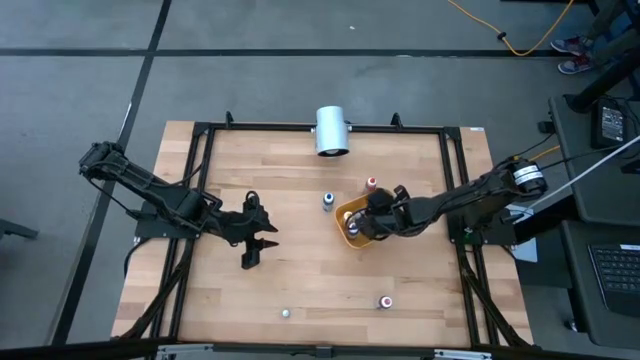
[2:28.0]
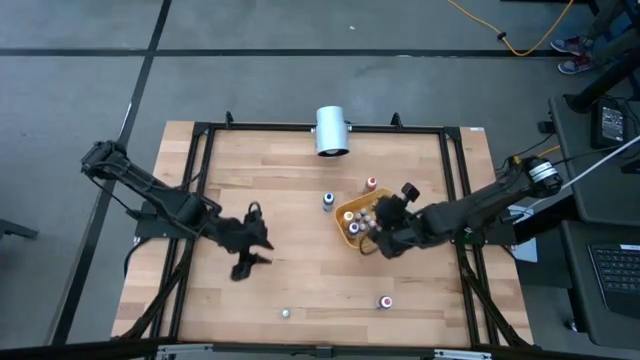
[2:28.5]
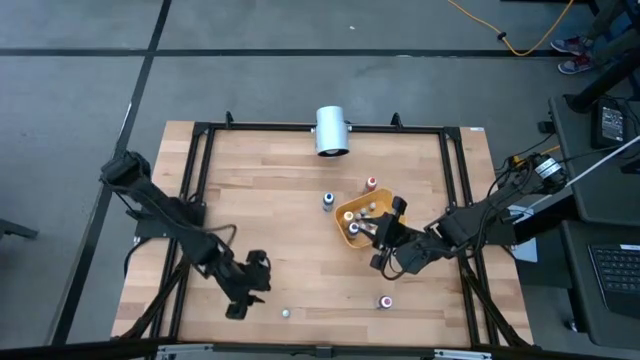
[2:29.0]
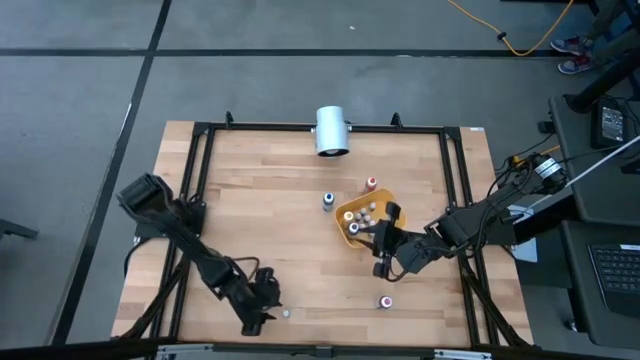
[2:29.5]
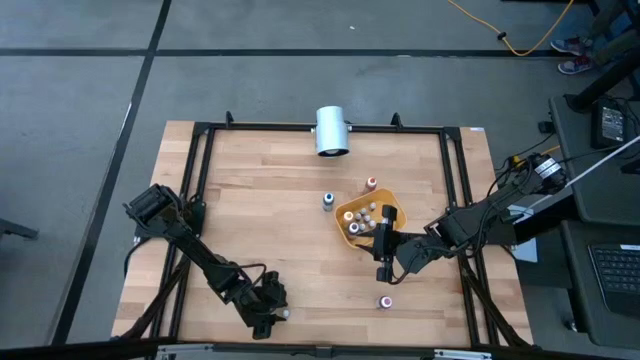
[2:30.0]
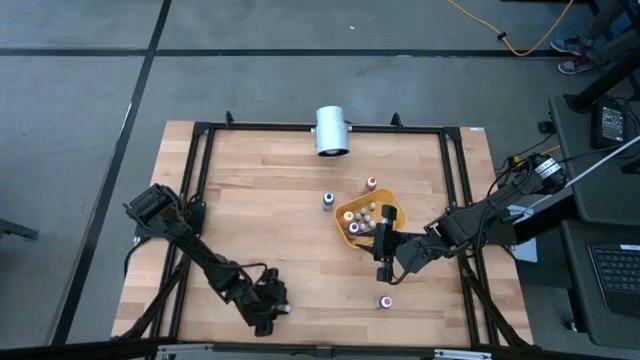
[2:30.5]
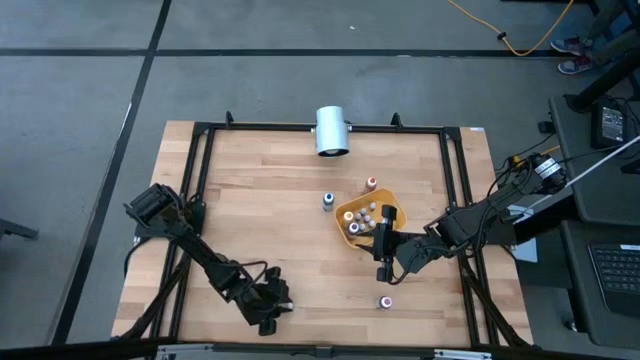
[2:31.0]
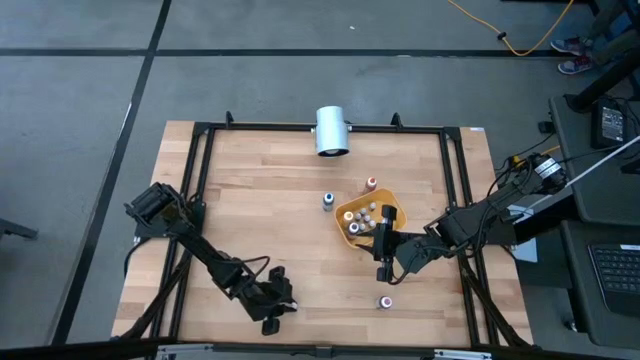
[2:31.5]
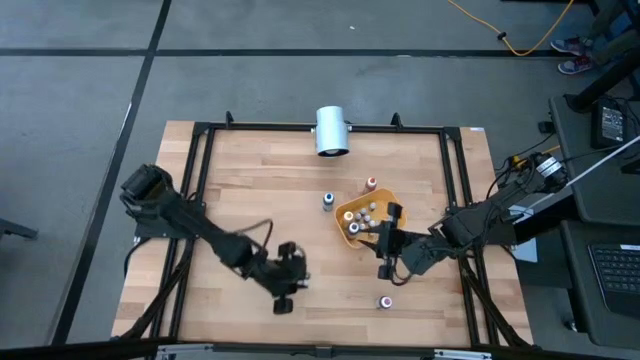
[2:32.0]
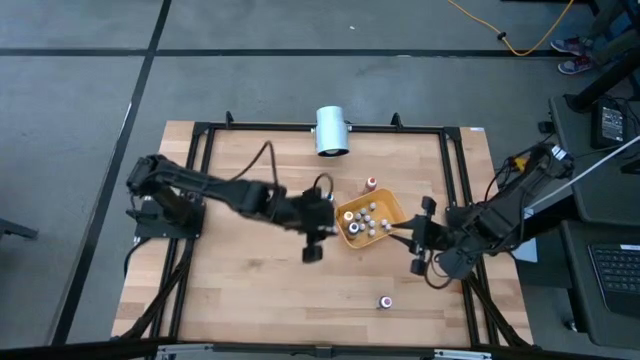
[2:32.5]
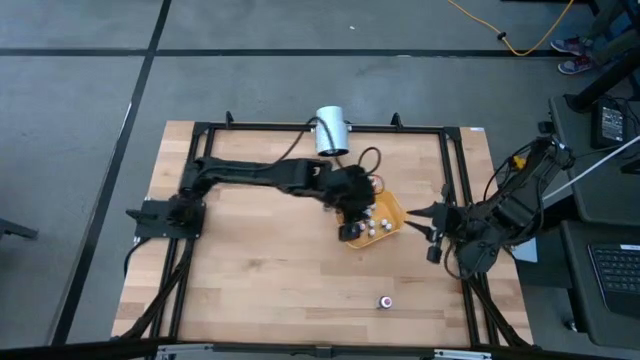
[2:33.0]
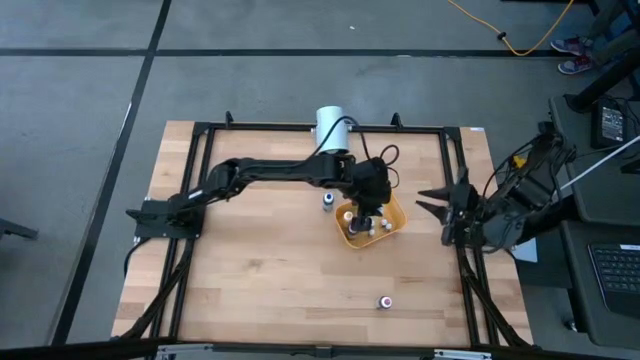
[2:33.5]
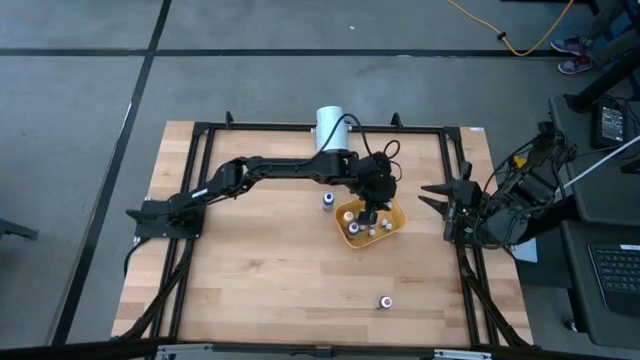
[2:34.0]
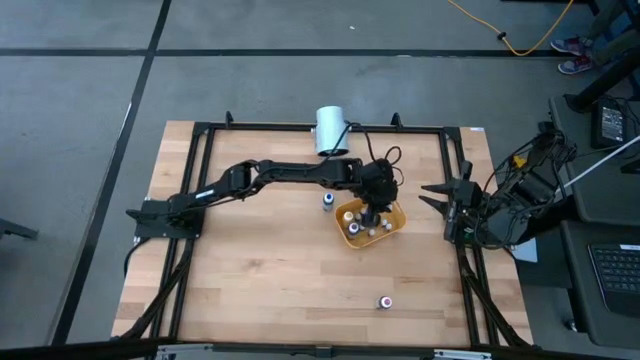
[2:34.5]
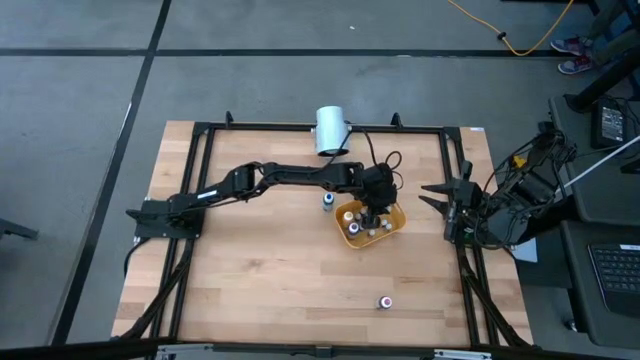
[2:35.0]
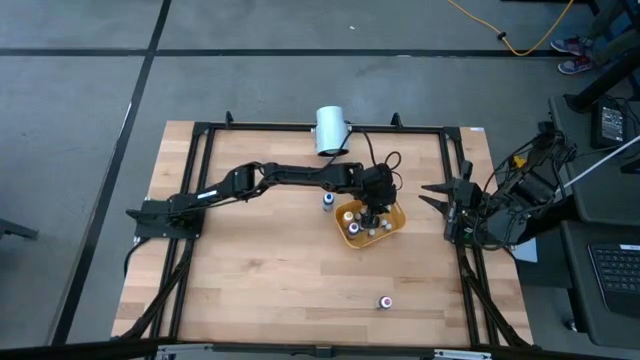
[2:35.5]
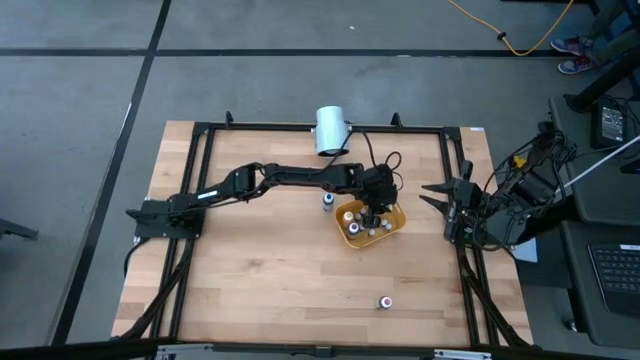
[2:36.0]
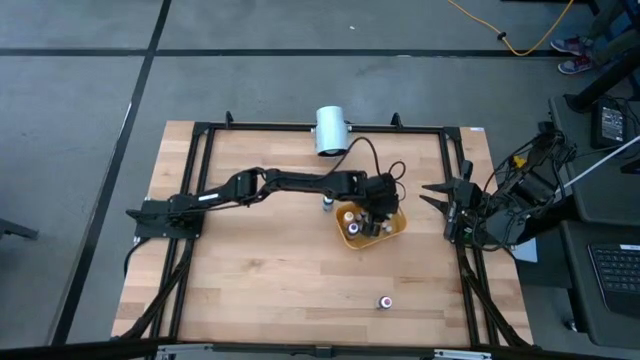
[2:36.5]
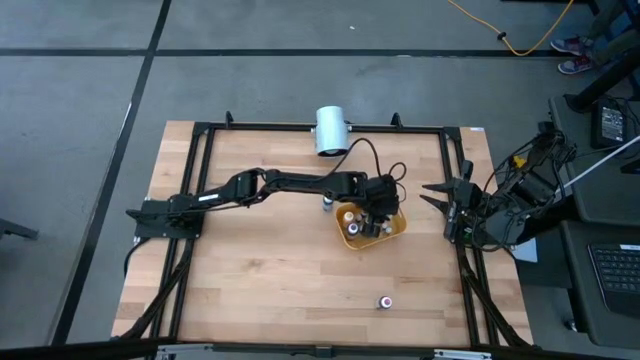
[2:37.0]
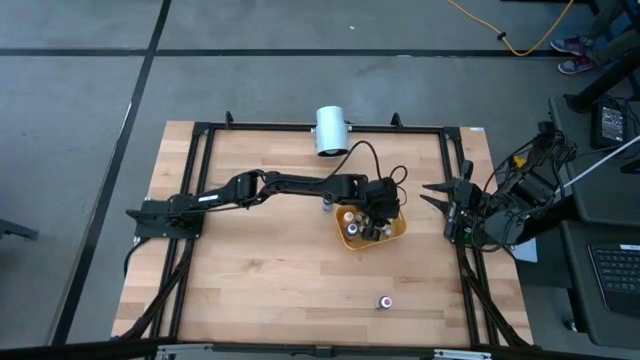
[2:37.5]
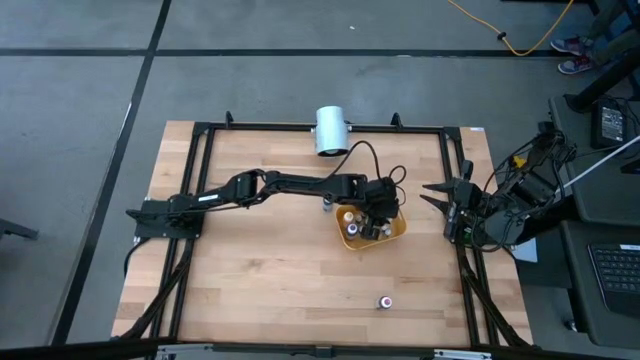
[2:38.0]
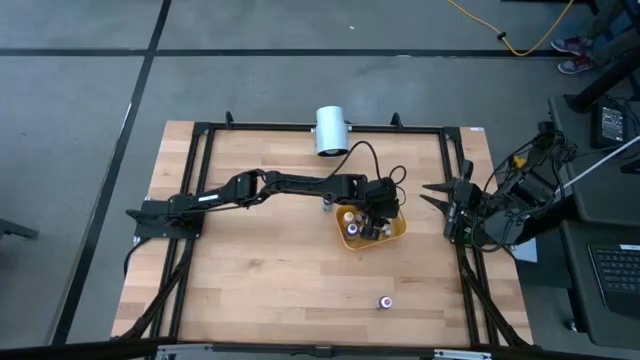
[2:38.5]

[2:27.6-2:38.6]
Task: Pick & Place food coloring
Put the small green food coloring bottle into the yellow bin

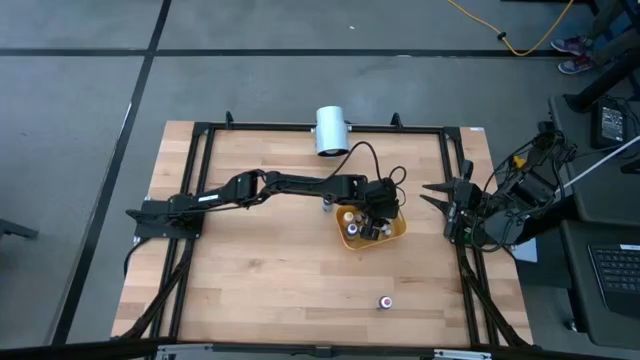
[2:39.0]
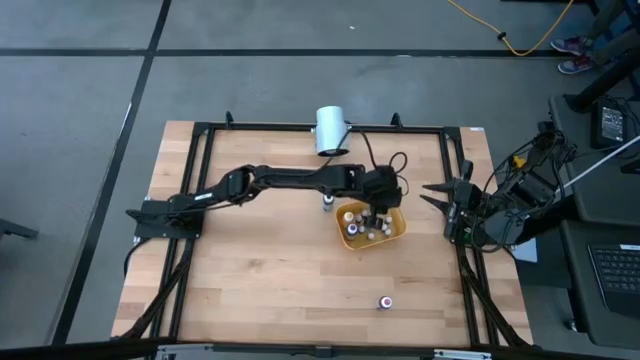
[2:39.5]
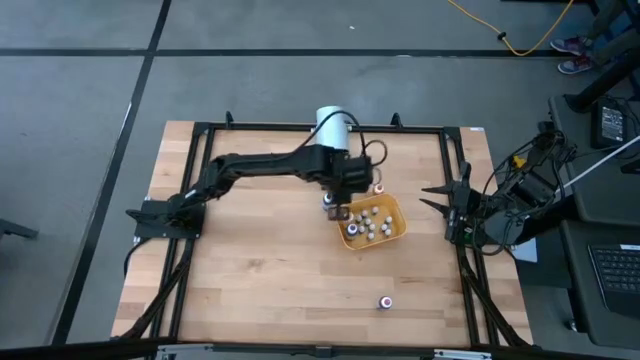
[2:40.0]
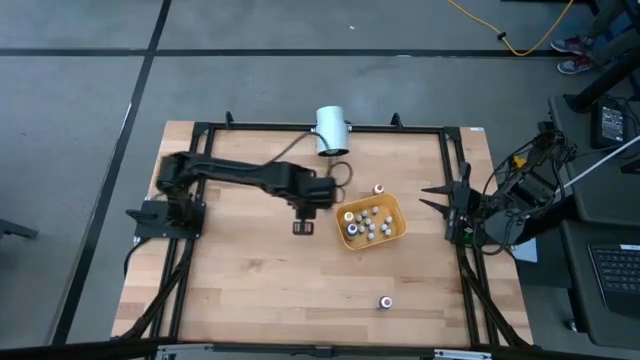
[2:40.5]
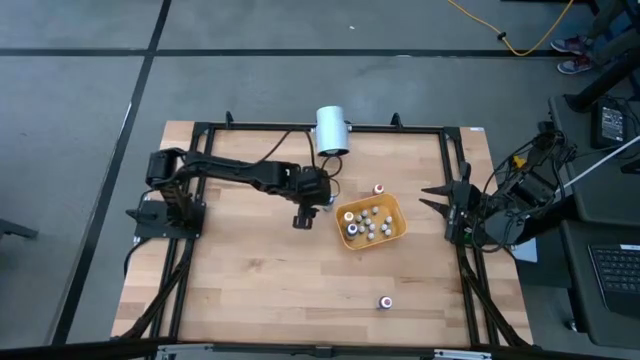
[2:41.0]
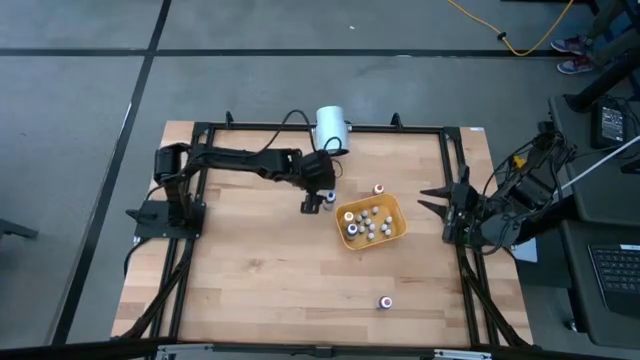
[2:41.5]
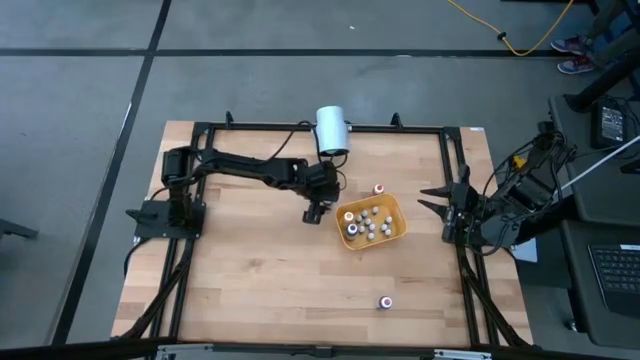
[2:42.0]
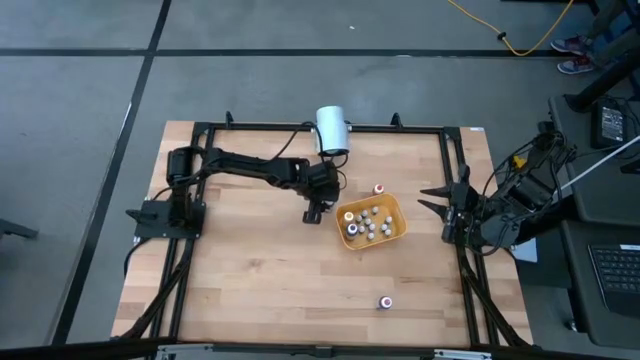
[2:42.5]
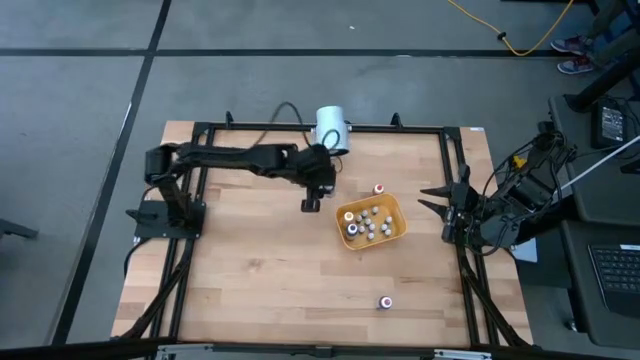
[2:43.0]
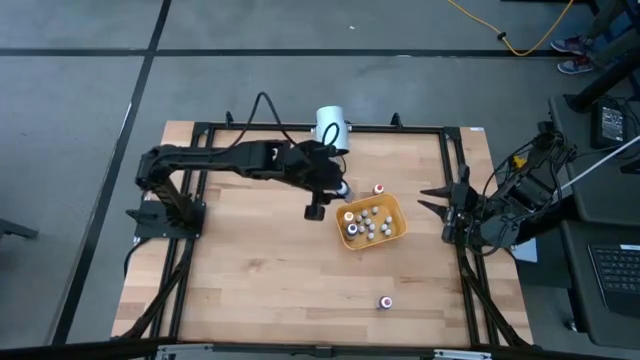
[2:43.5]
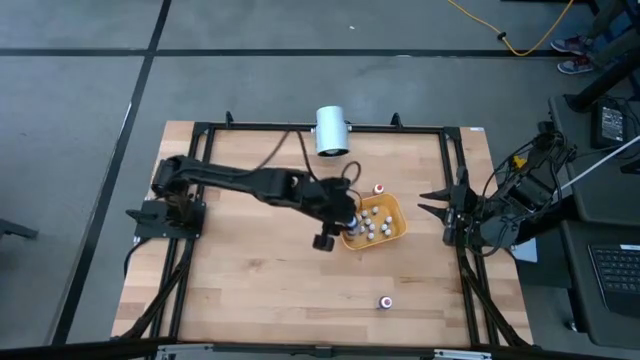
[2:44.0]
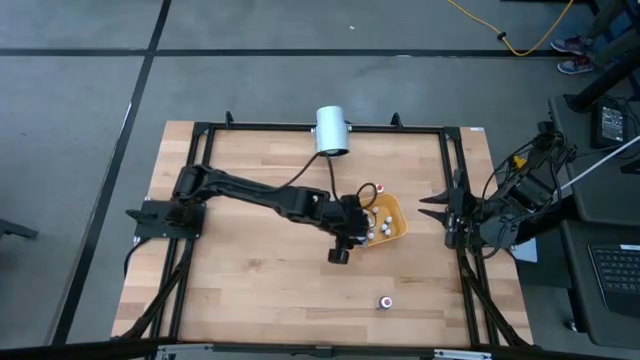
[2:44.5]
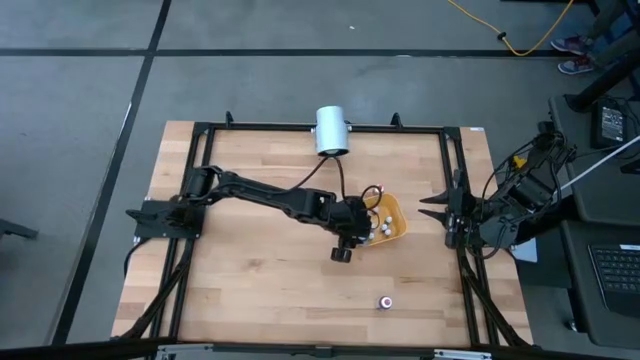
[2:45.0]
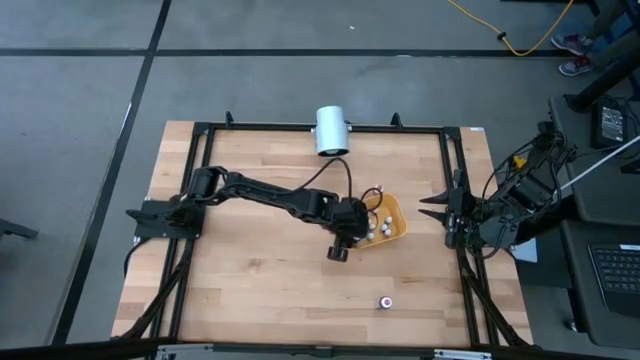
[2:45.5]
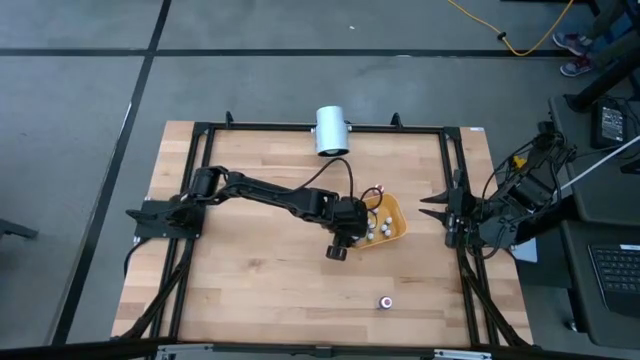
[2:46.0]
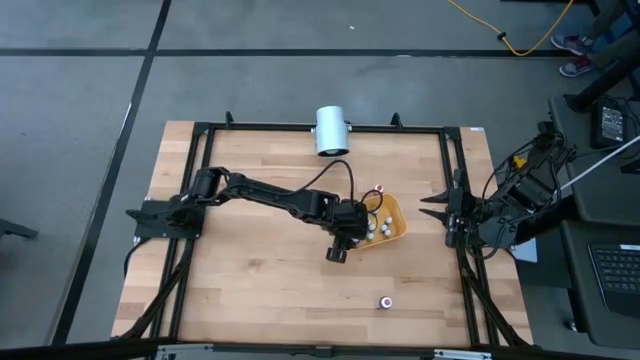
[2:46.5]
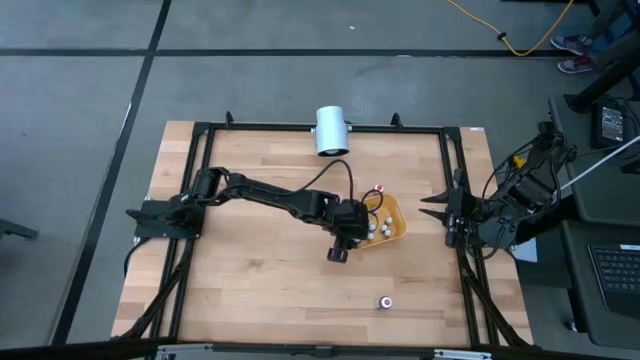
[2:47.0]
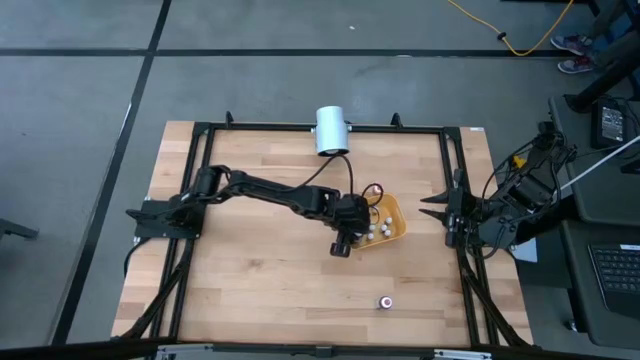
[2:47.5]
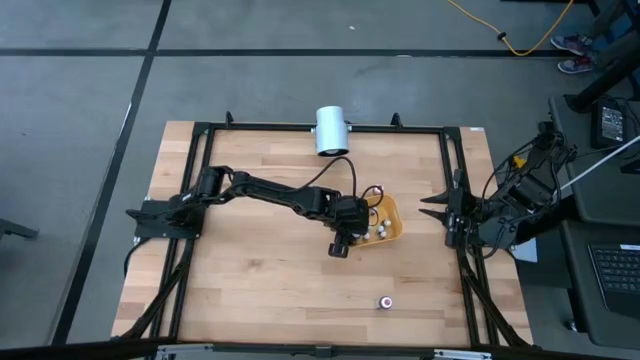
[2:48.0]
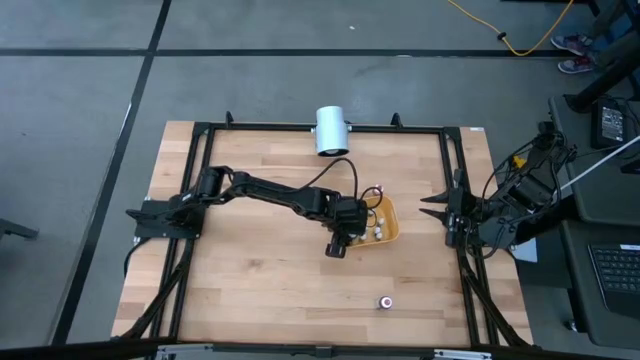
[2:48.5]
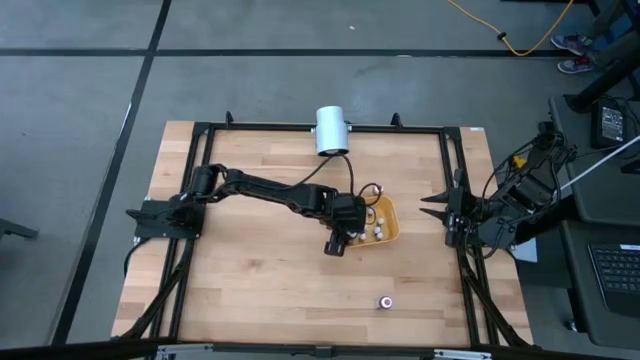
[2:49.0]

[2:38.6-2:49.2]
Put the large blue food coloring bottle into the yellow bin
